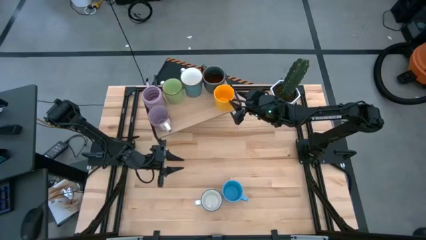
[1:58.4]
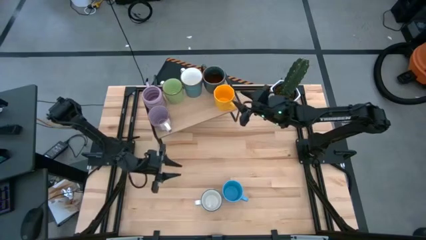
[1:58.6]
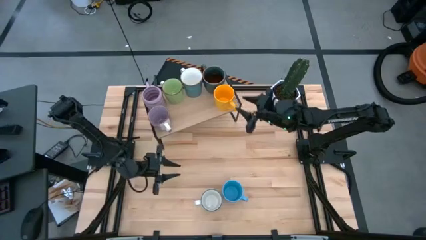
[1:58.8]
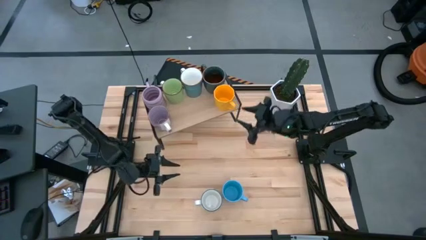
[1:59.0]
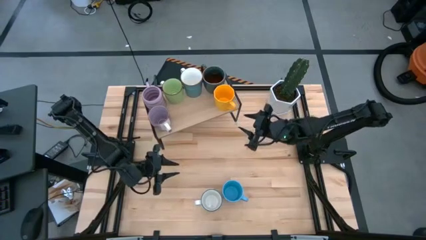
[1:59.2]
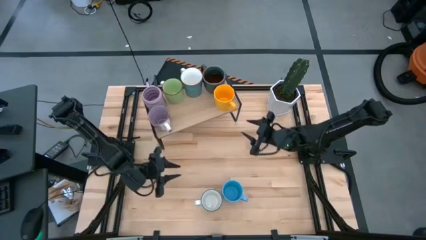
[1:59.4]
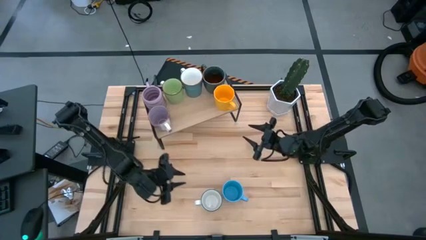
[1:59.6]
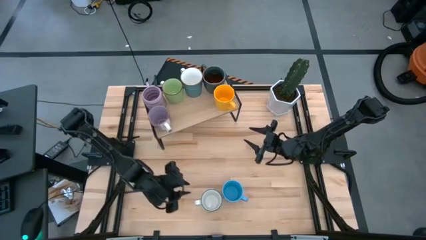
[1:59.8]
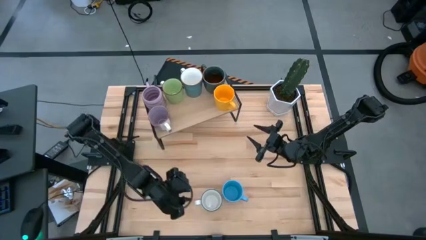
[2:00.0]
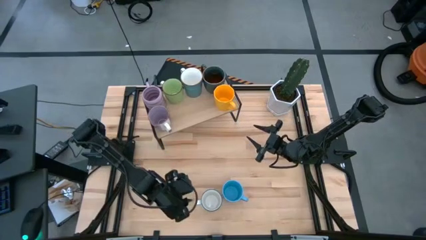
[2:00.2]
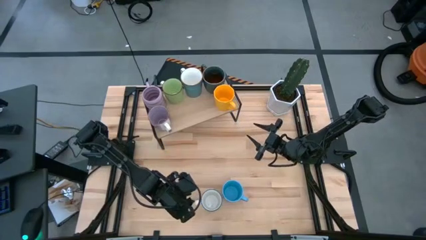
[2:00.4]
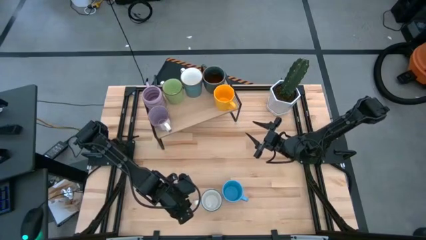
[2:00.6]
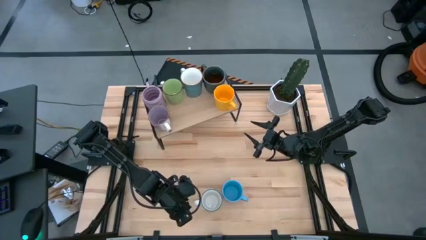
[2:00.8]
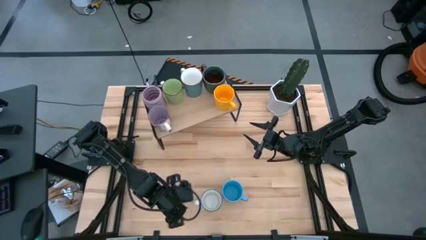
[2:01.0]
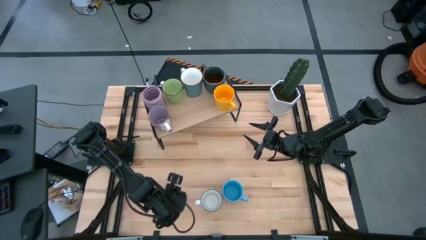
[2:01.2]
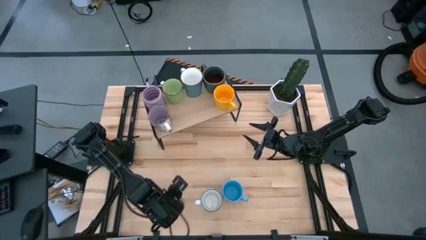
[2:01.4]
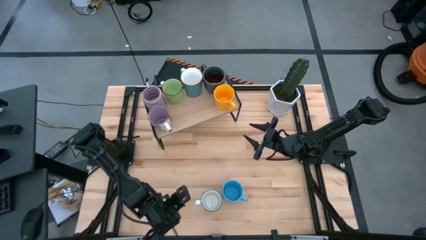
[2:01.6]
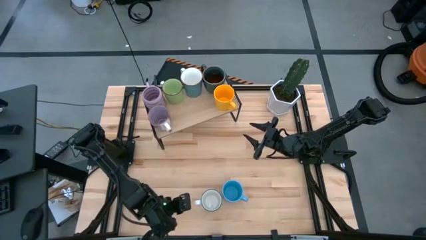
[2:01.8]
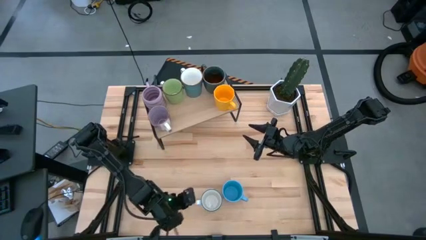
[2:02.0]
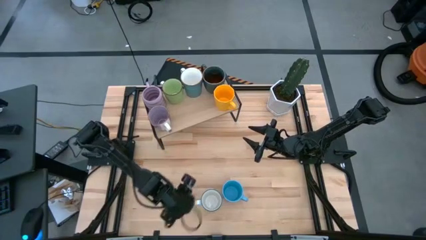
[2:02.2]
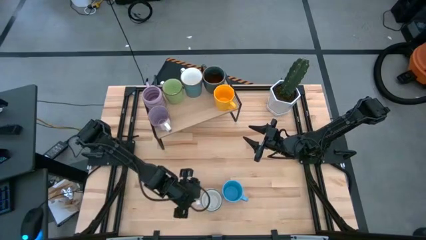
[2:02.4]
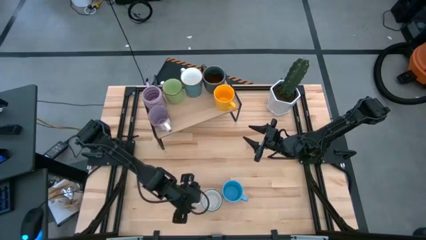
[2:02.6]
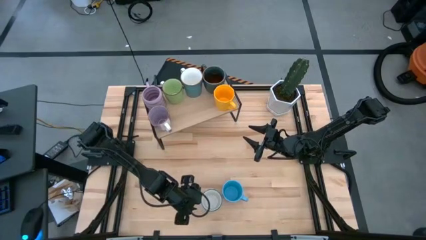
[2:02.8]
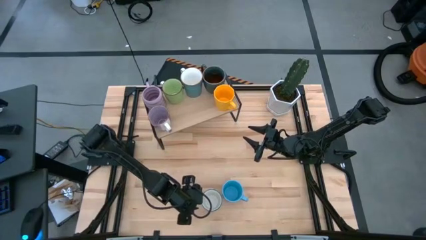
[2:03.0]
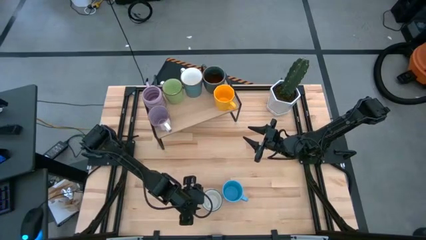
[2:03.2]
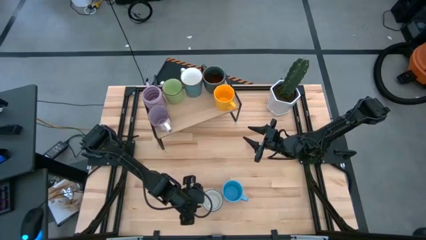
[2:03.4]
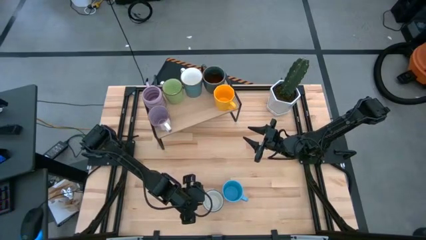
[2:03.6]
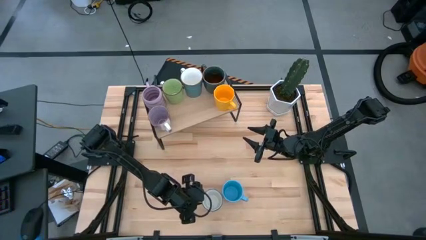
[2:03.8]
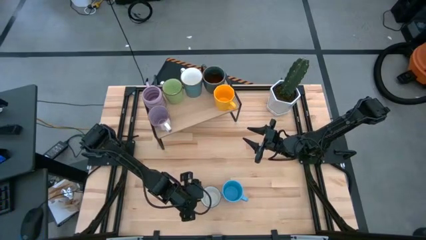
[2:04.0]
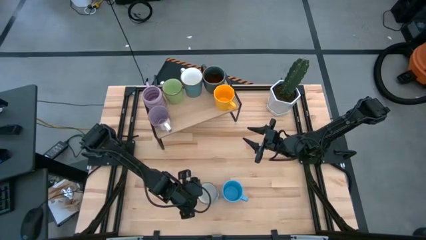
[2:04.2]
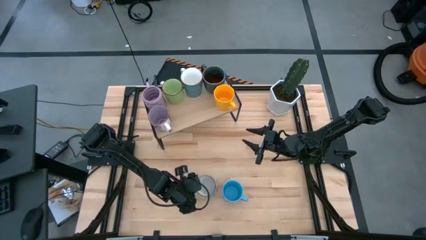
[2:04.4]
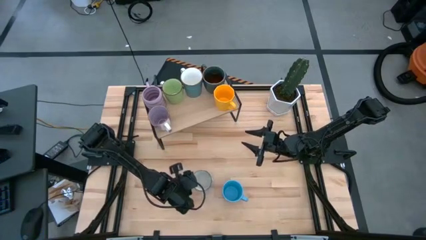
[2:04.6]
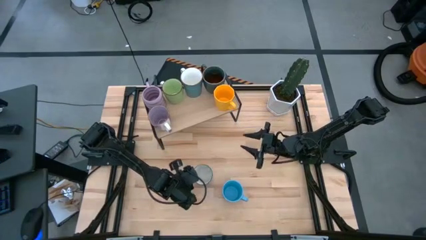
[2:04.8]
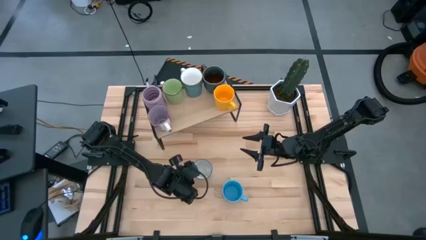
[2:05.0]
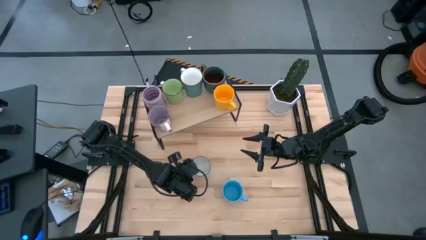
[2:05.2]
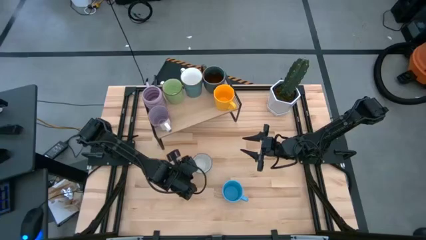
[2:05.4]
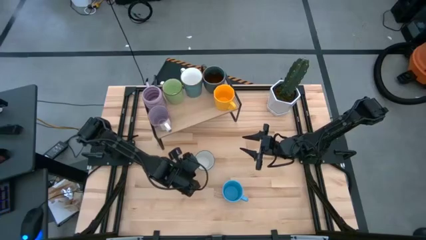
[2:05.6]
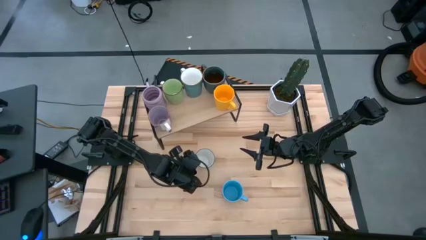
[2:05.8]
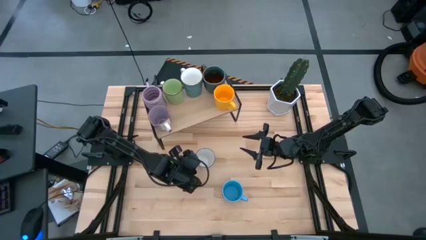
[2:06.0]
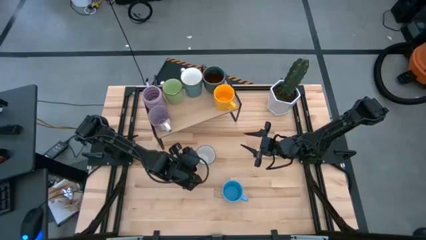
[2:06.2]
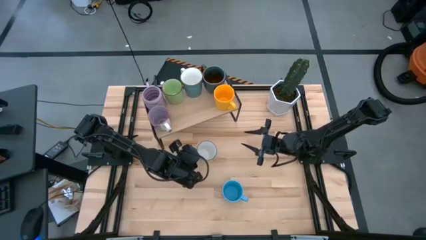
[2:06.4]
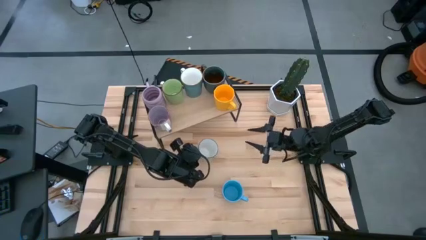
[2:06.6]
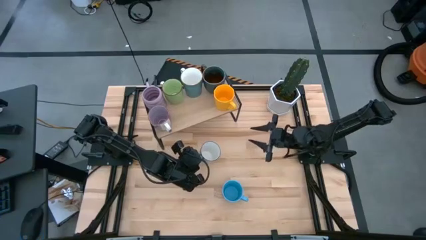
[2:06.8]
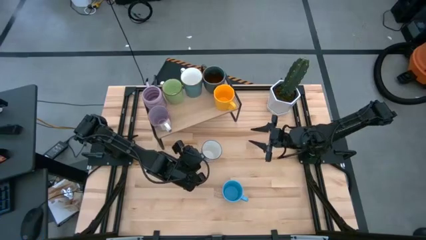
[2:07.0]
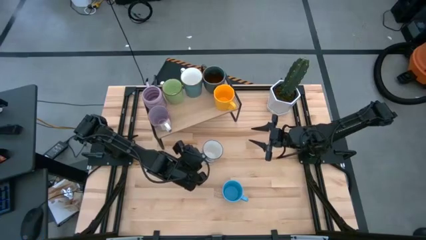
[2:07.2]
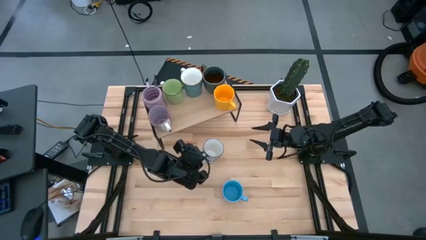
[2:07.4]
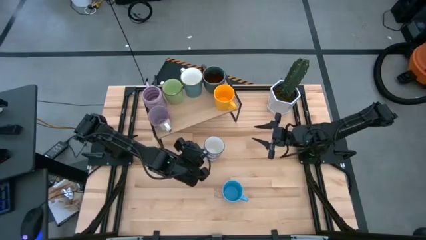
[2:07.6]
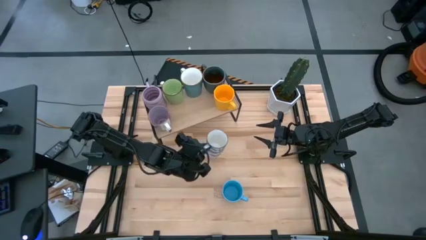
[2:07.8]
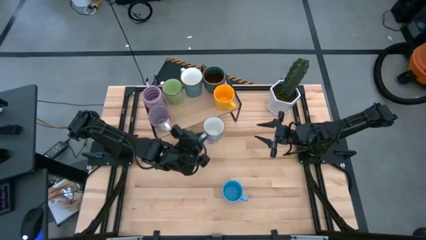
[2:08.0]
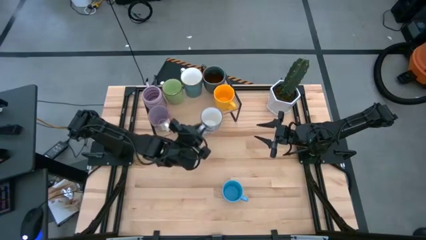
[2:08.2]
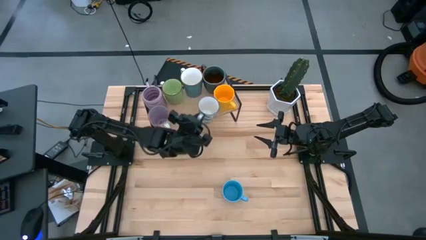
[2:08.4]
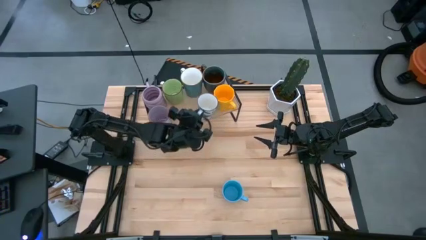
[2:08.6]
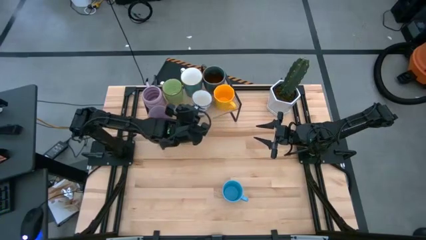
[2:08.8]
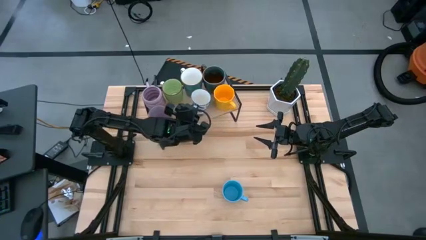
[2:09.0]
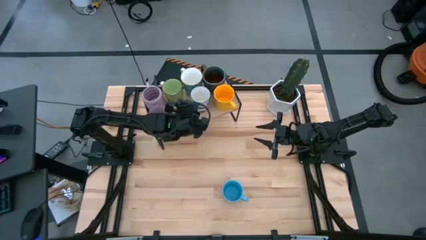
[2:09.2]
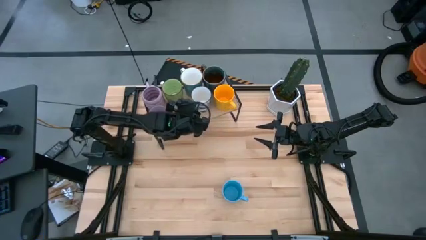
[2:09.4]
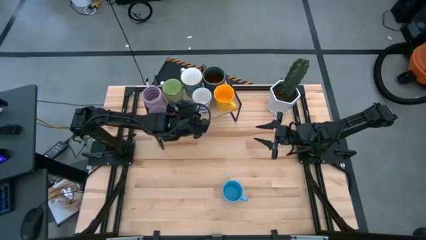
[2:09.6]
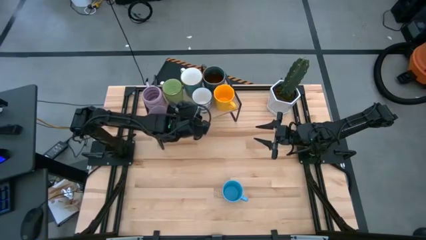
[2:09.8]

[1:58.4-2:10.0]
Task: Place coffee mugs
Put the white-blue patterned mug on the shelf
